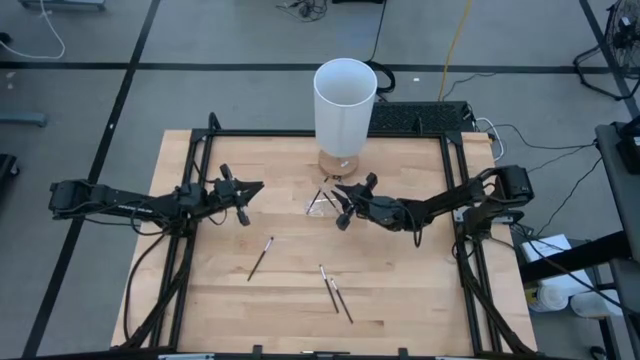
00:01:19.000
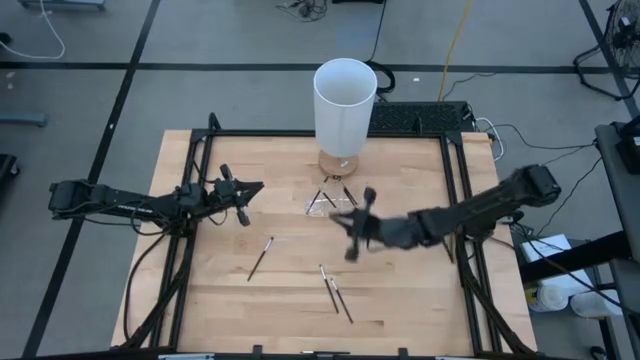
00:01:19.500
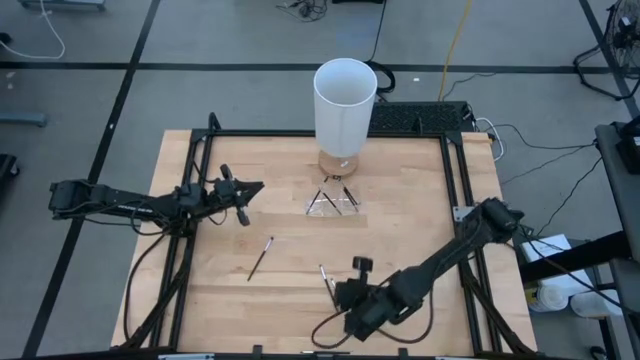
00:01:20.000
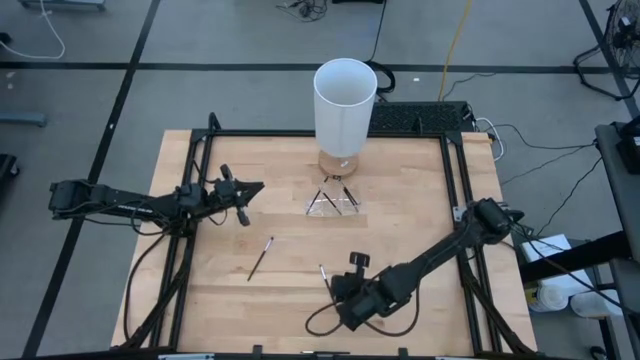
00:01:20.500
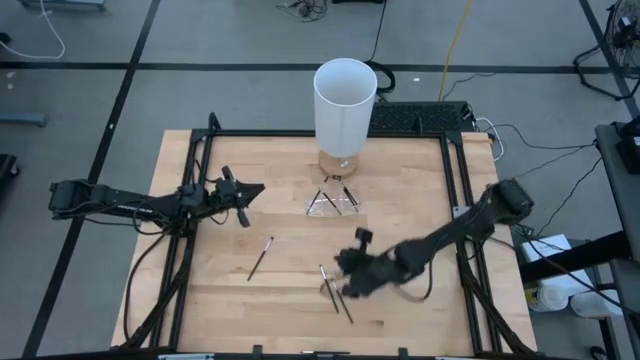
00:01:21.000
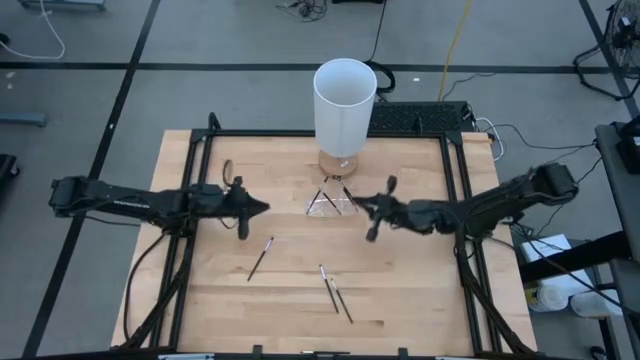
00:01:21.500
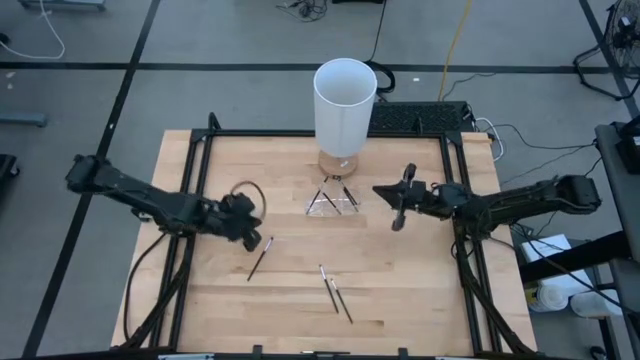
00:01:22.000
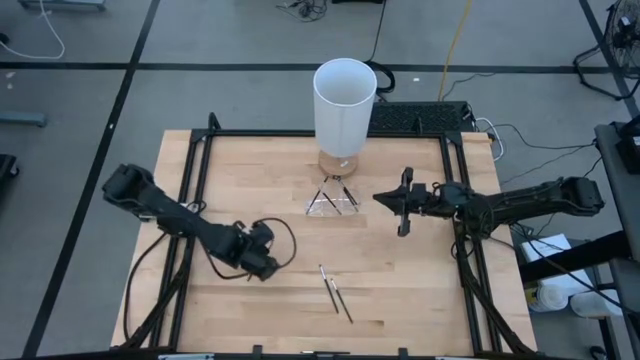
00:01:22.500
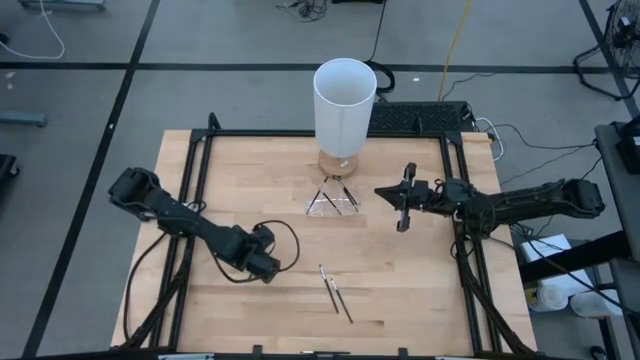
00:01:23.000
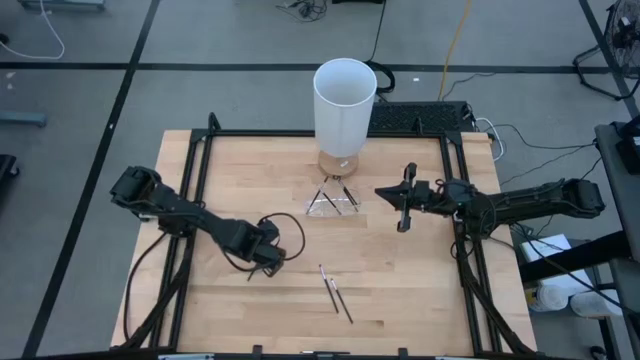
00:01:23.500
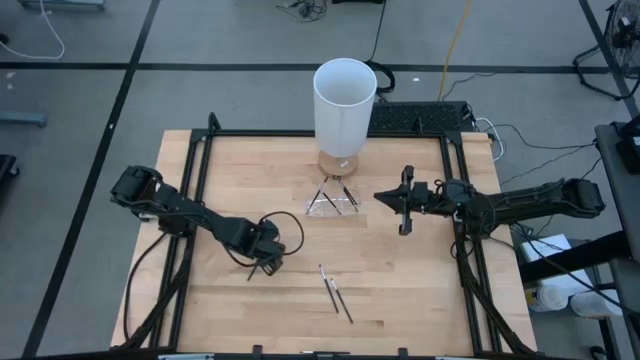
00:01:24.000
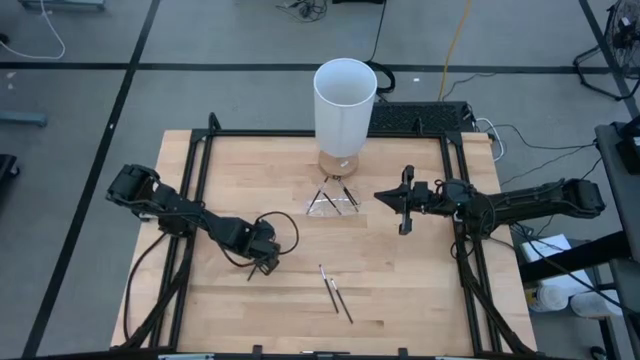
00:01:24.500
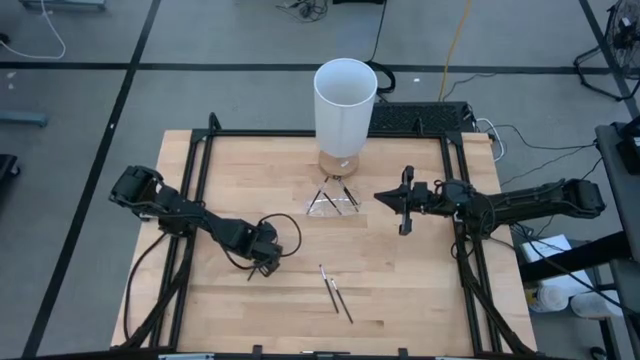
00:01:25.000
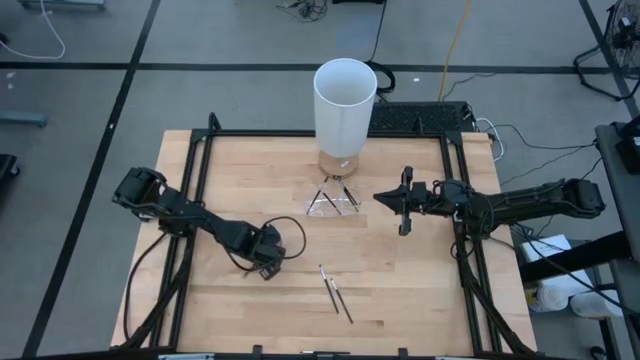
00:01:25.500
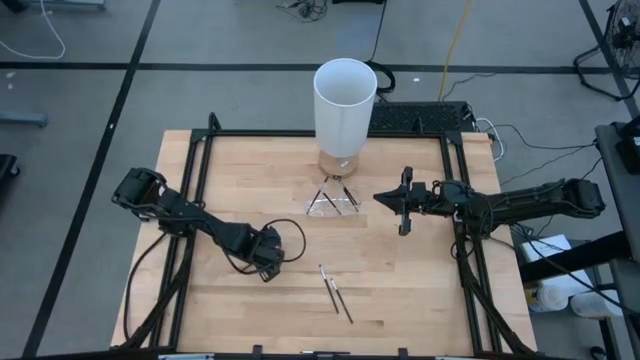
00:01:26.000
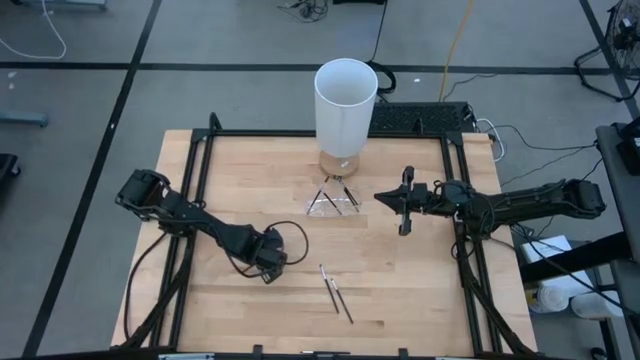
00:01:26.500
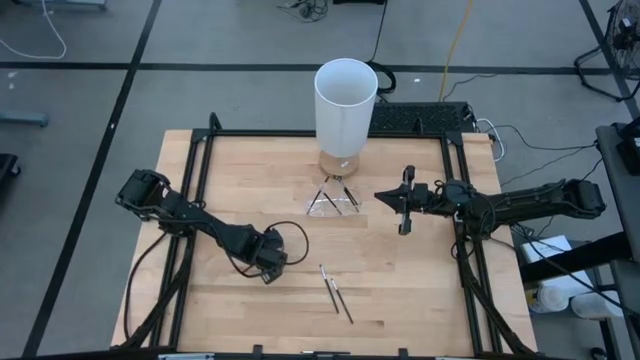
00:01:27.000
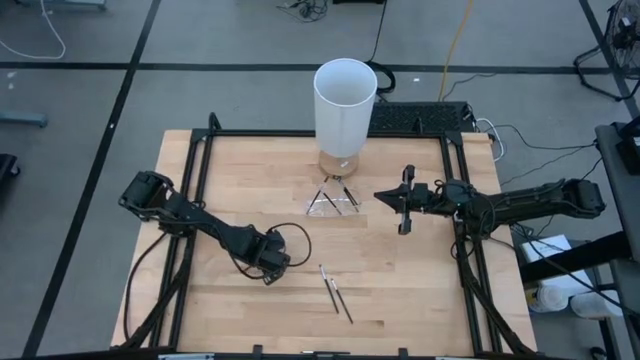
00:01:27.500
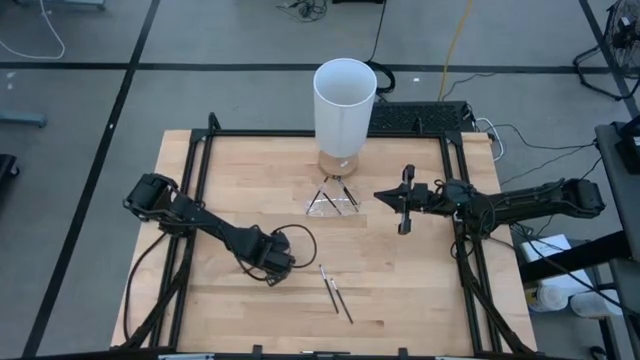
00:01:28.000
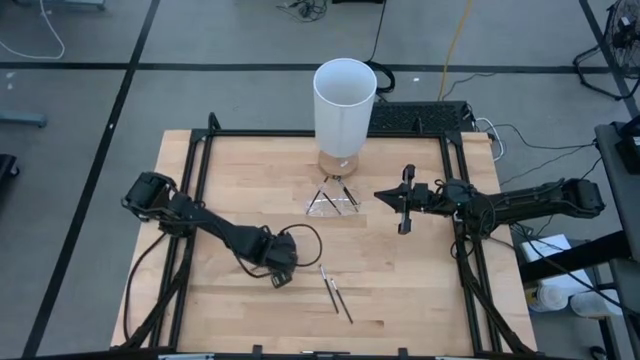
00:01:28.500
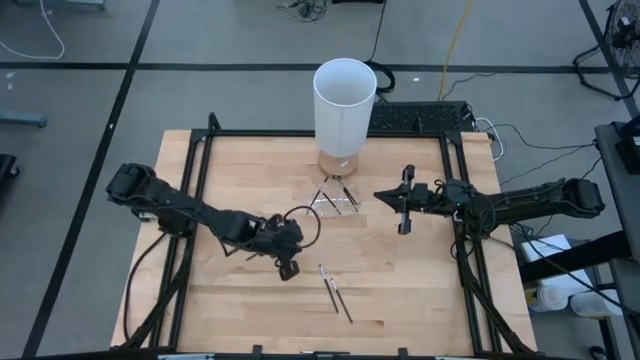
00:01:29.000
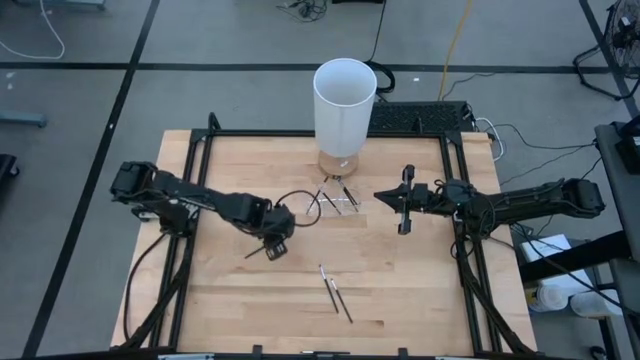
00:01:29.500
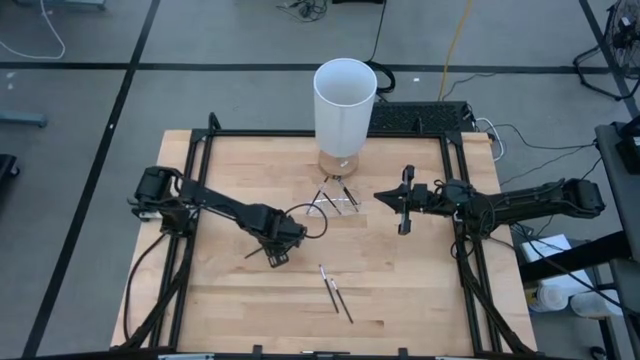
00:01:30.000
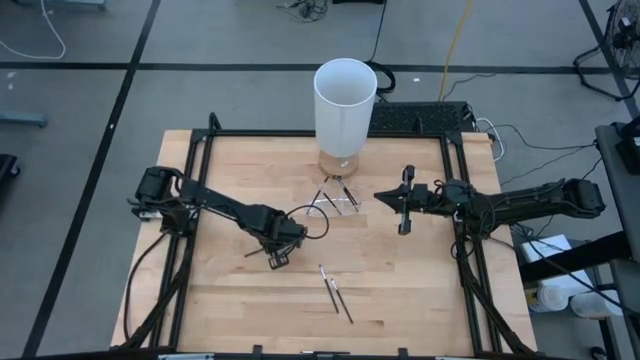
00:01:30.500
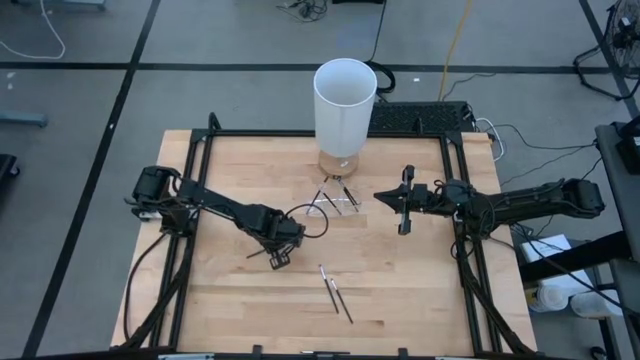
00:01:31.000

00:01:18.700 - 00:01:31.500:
Task: Put items in baskets/containers
Put the eyeshadow brush into the transparent organizer

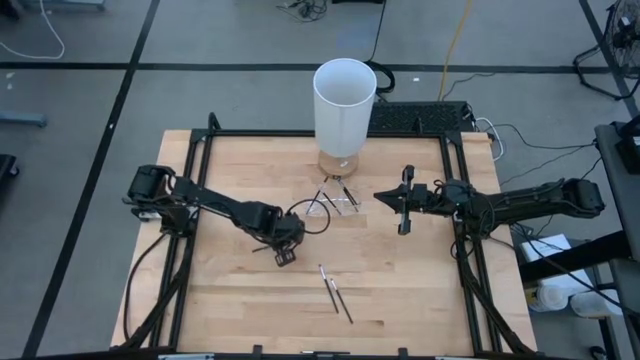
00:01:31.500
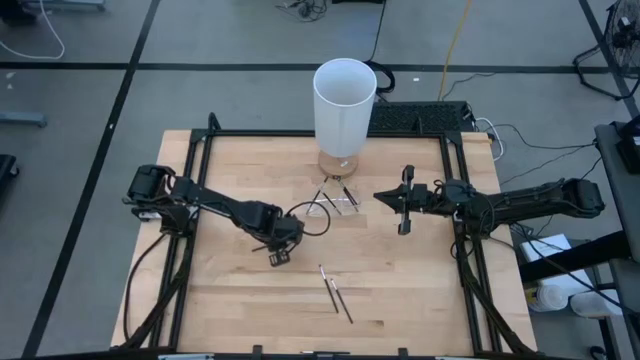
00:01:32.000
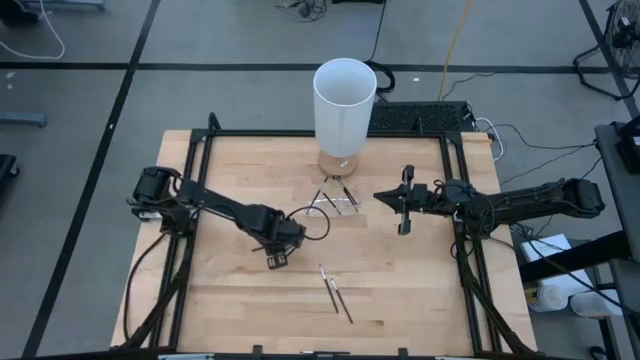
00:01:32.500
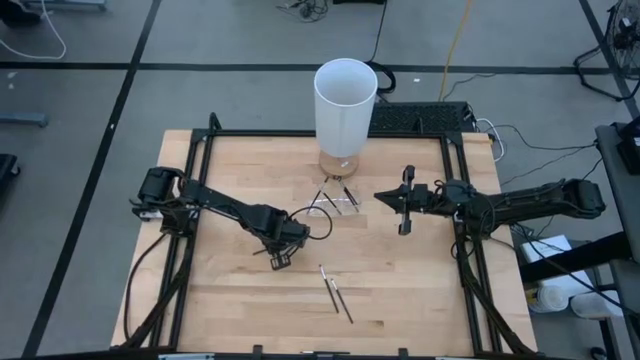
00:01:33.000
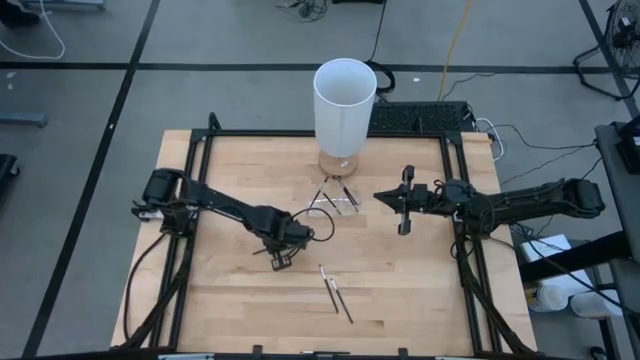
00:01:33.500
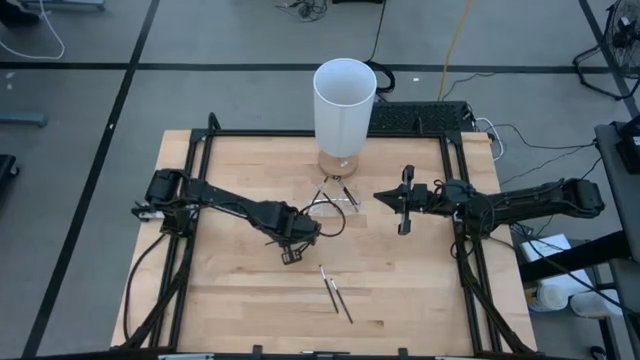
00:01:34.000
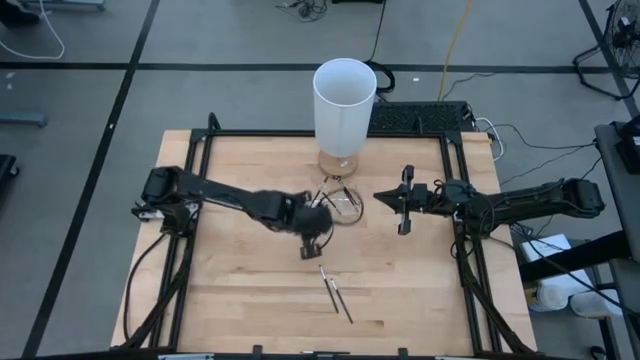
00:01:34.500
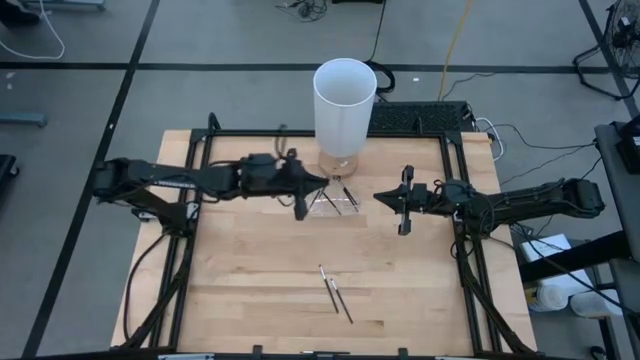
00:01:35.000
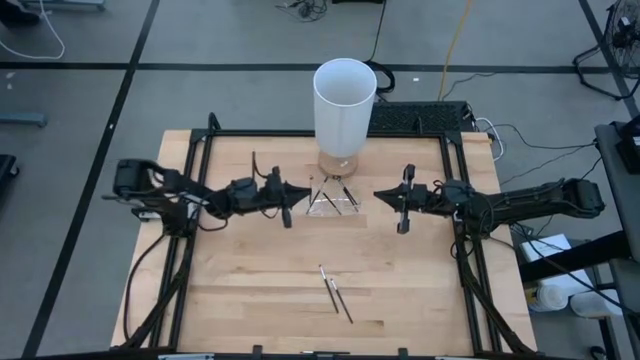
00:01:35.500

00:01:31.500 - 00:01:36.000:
Put the eyeshadow brush into the transparent organizer

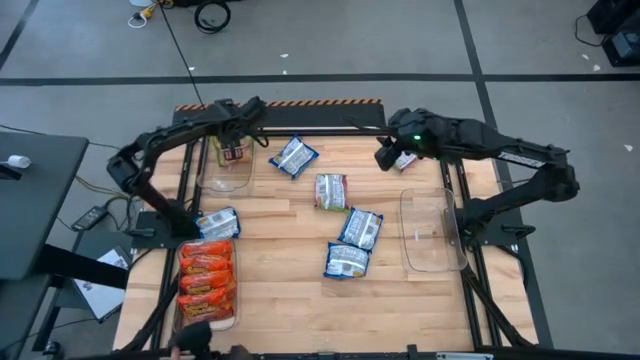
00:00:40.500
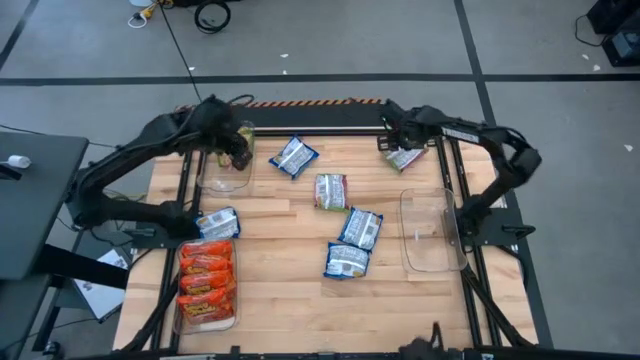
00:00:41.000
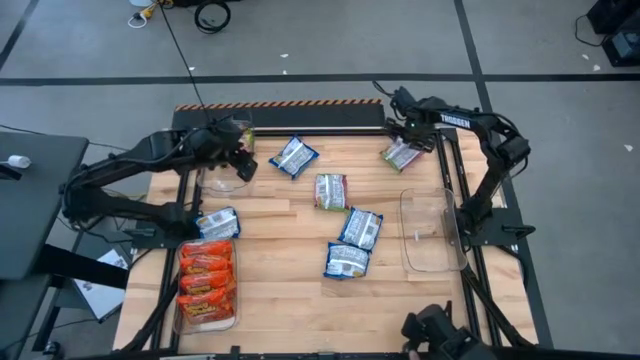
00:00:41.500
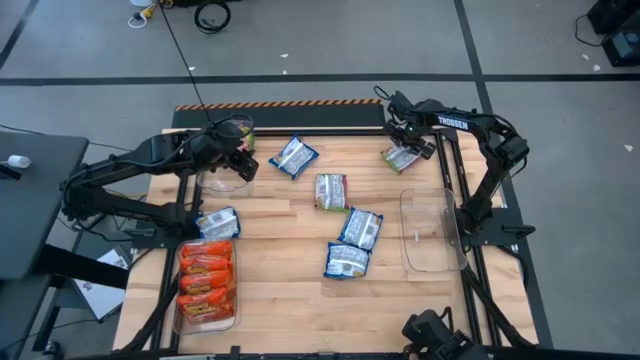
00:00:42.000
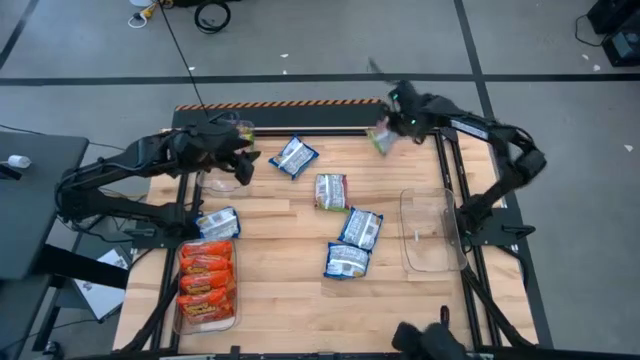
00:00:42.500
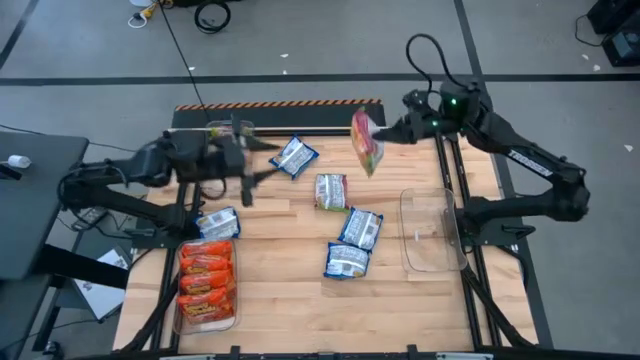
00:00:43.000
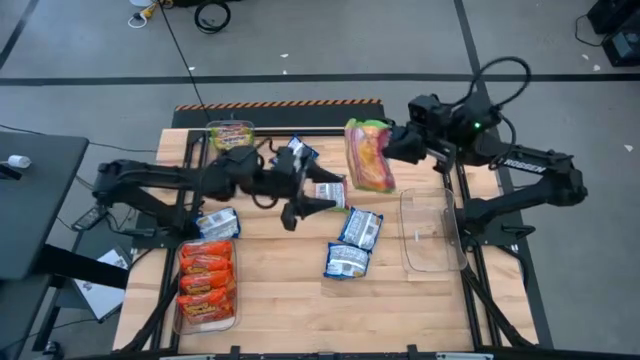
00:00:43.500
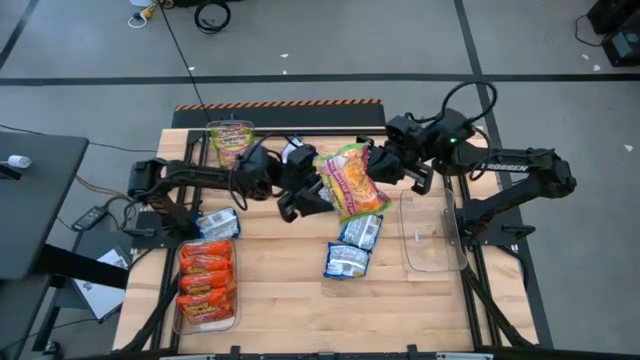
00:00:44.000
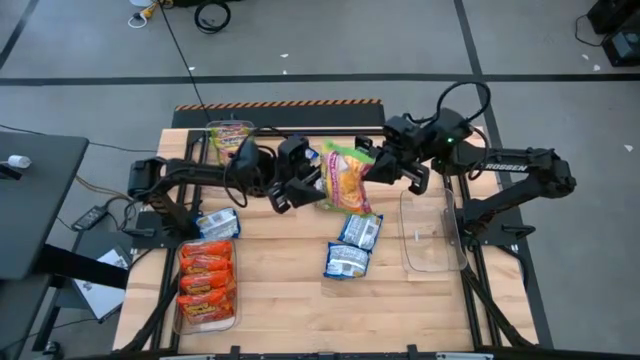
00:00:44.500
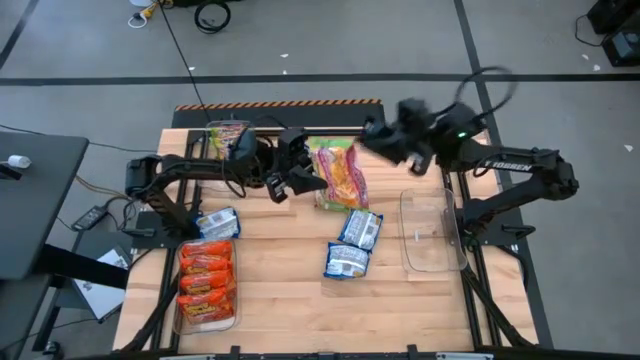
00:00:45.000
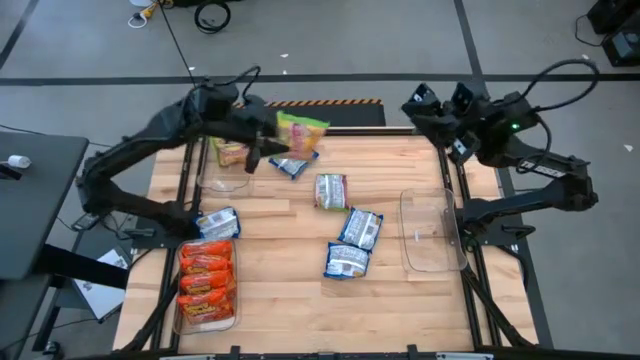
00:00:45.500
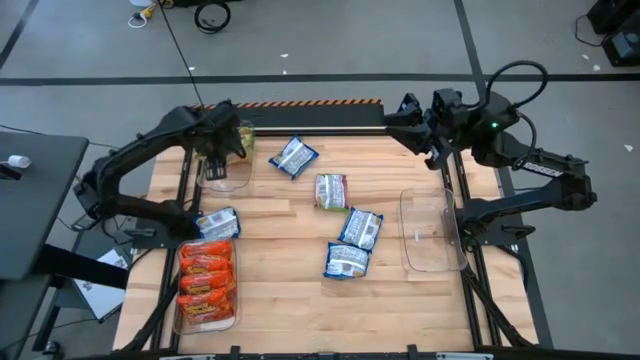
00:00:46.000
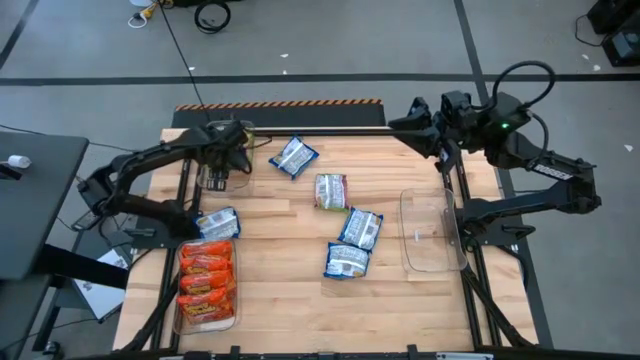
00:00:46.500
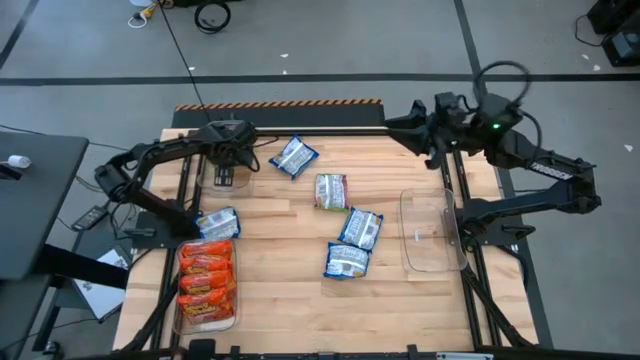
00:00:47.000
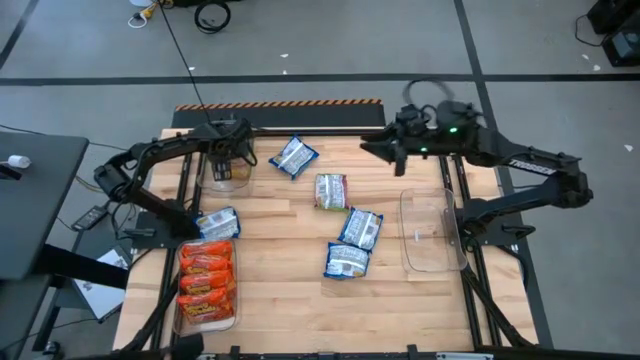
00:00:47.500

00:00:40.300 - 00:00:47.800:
Task: Sort Maruchan noodles
Put the right green noodle pack into the top left transparent bin
